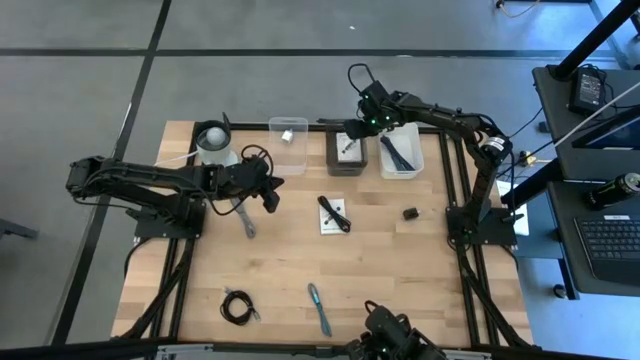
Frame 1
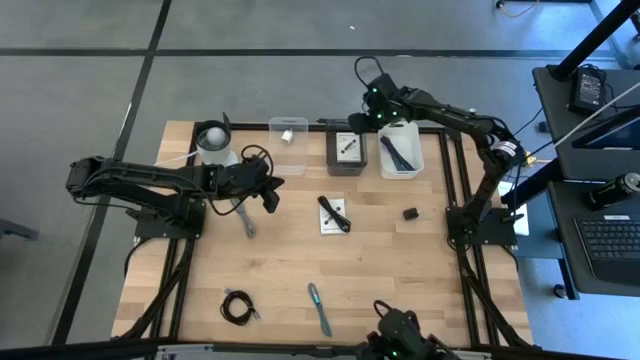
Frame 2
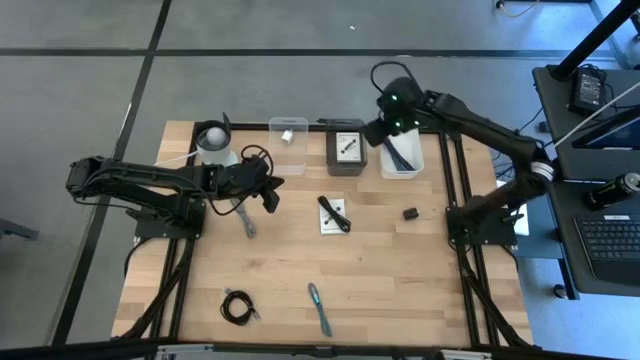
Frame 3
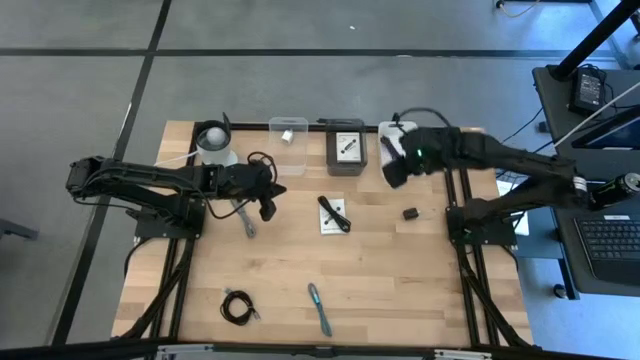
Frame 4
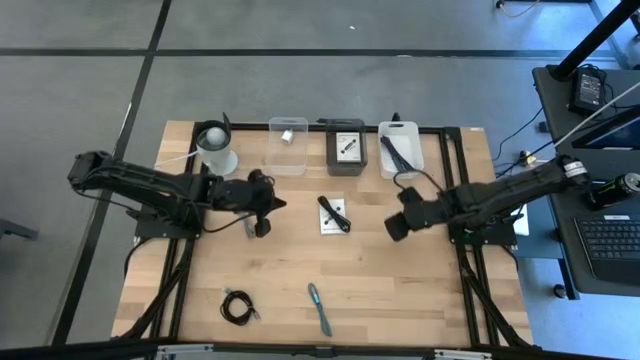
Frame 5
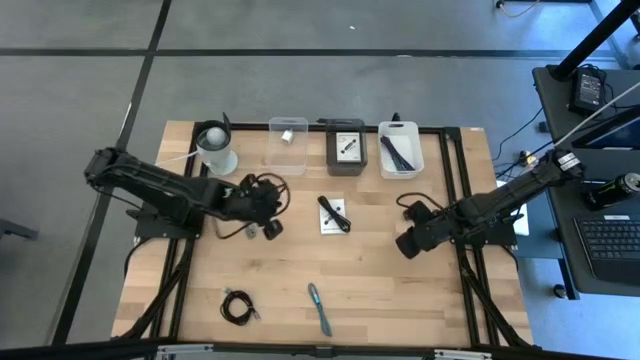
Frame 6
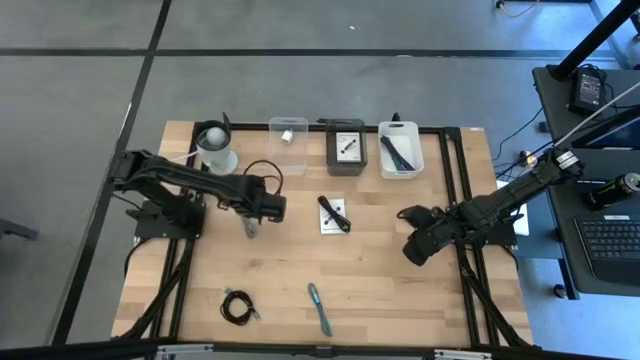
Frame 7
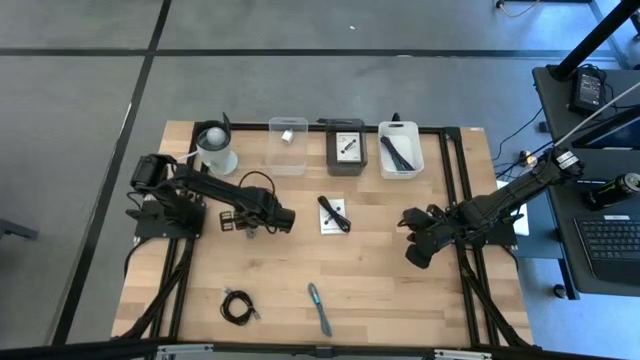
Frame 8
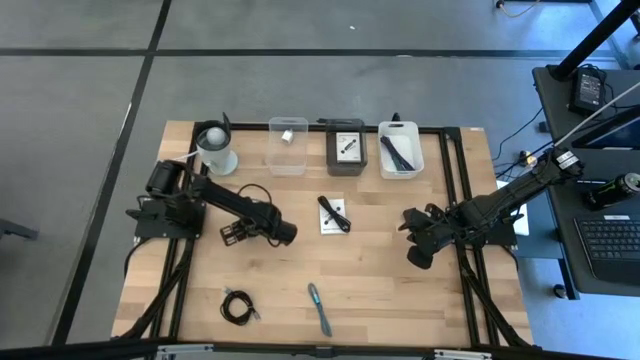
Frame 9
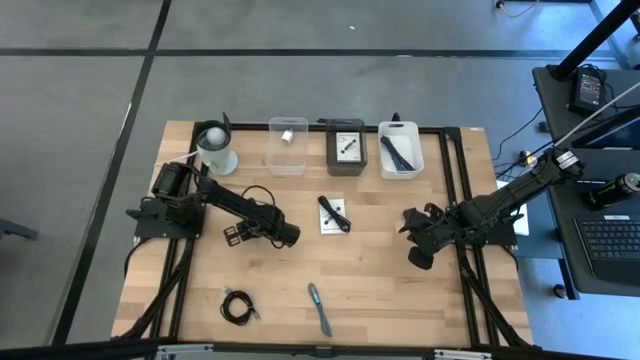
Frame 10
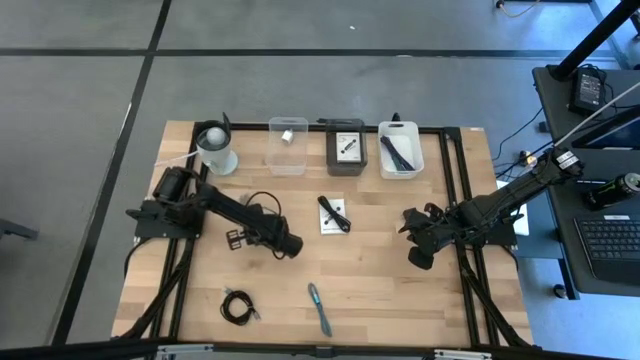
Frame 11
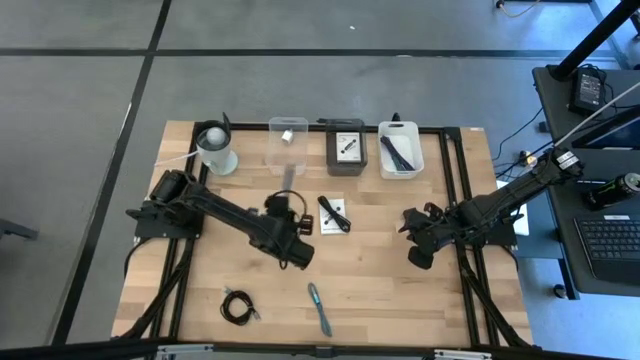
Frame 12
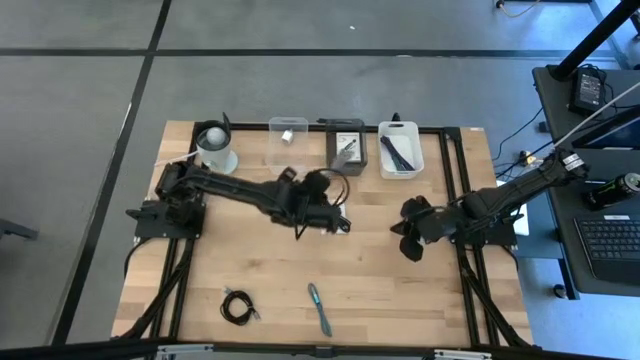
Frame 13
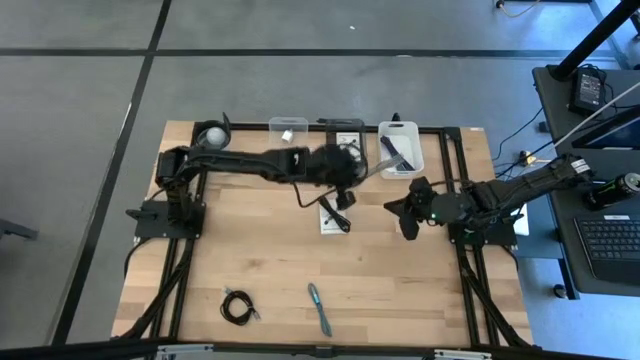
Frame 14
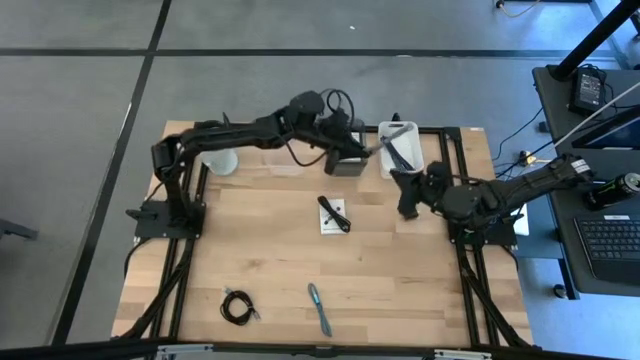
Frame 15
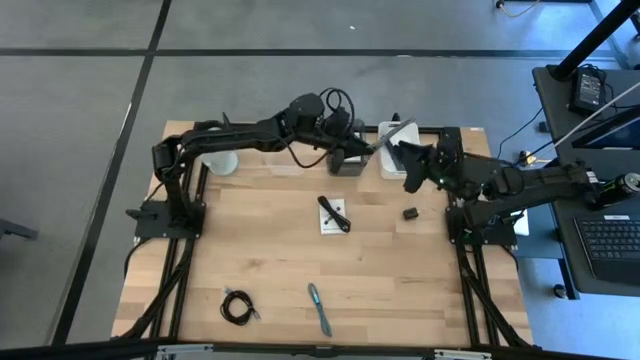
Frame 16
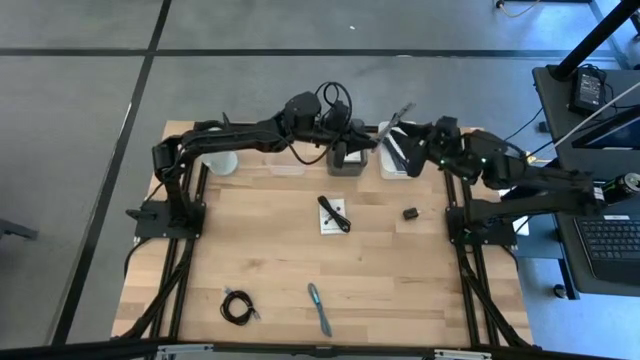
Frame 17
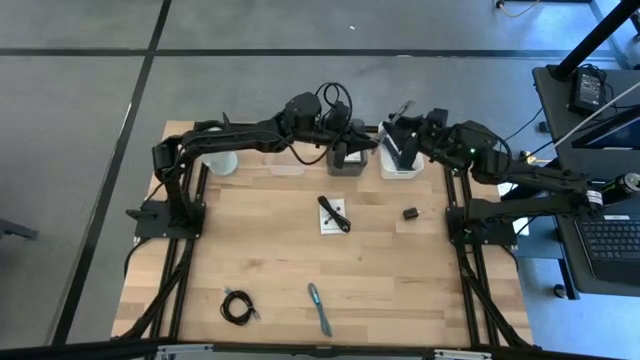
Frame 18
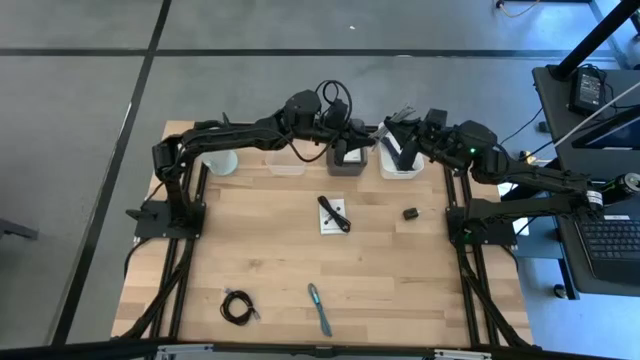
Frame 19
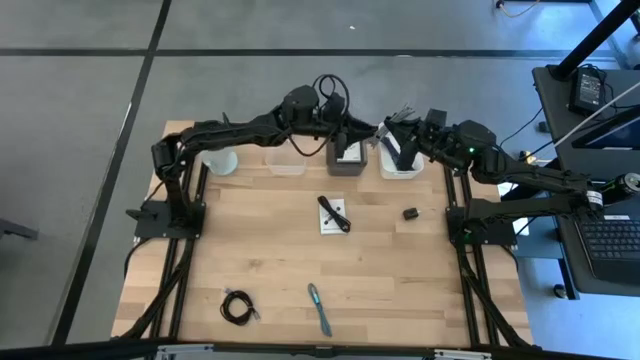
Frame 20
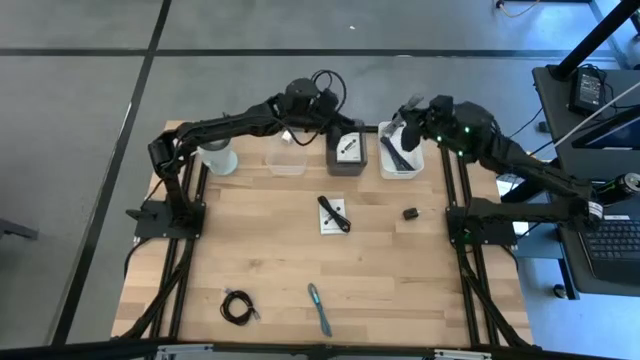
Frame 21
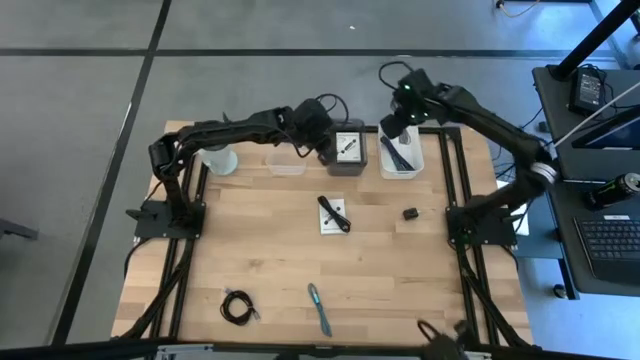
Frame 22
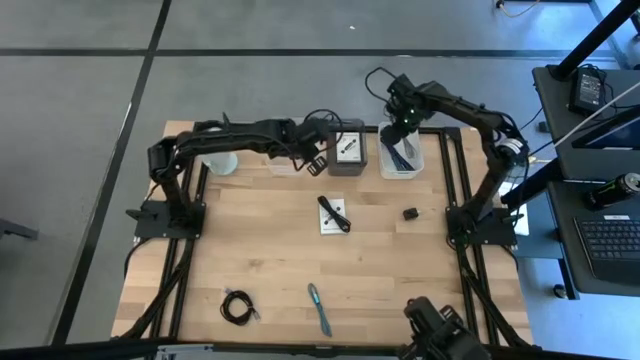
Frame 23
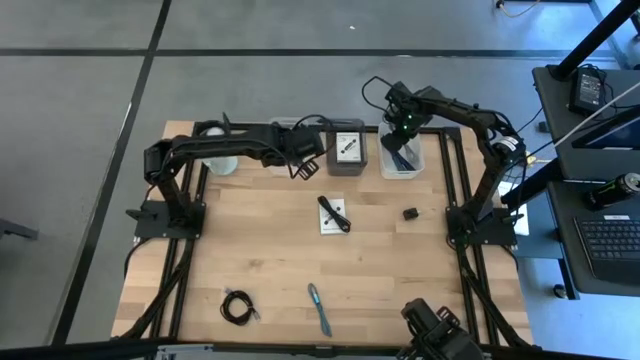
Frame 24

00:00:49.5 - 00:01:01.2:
Task: Pick and place items into bin
Put the white charger cable into the white bin

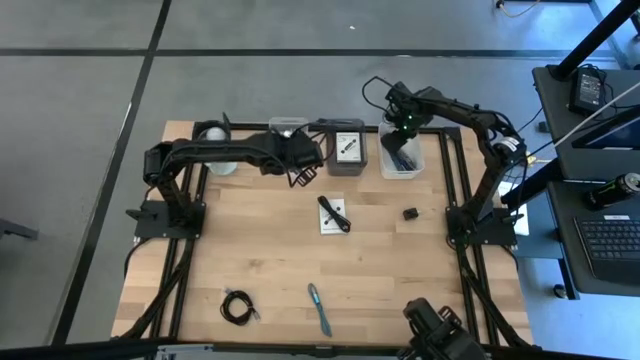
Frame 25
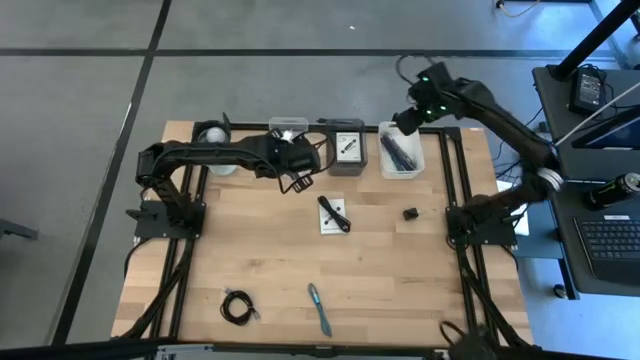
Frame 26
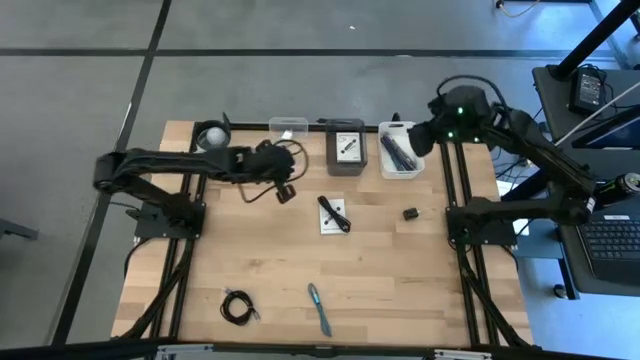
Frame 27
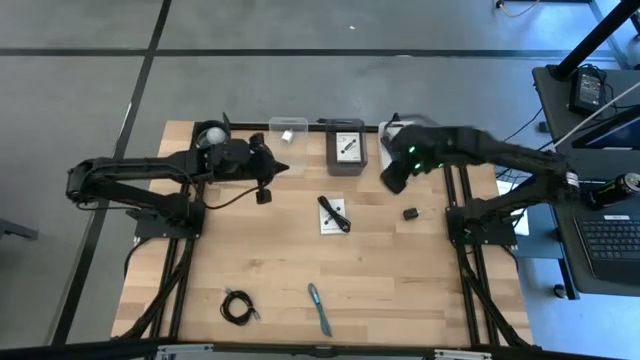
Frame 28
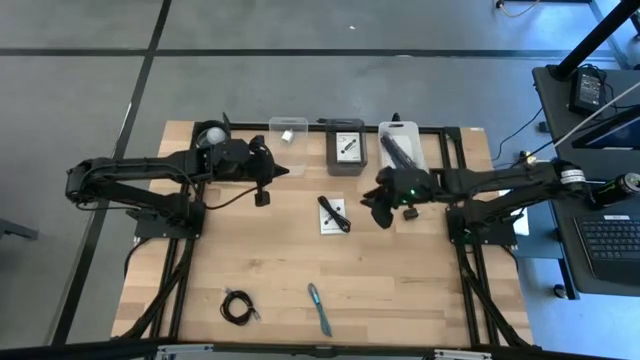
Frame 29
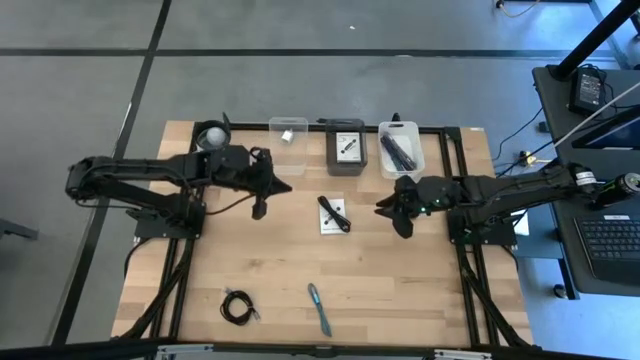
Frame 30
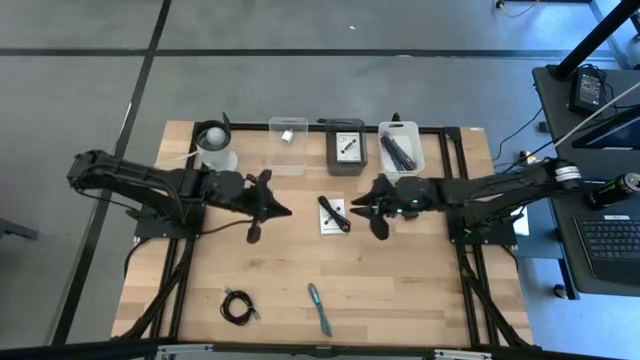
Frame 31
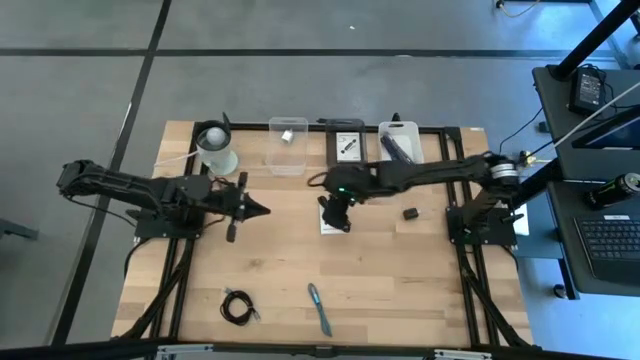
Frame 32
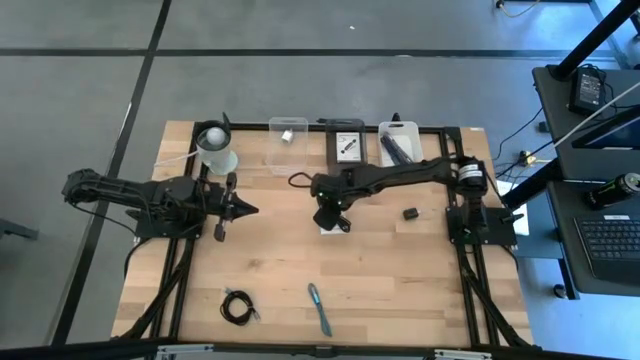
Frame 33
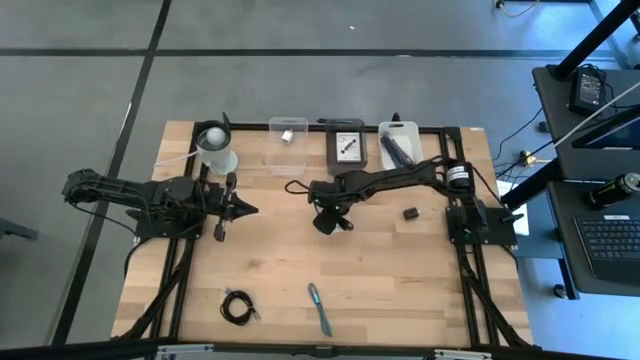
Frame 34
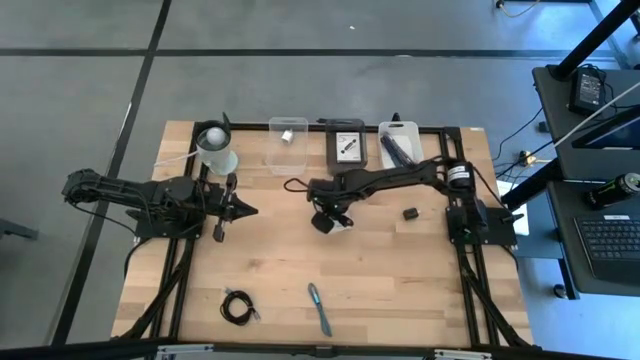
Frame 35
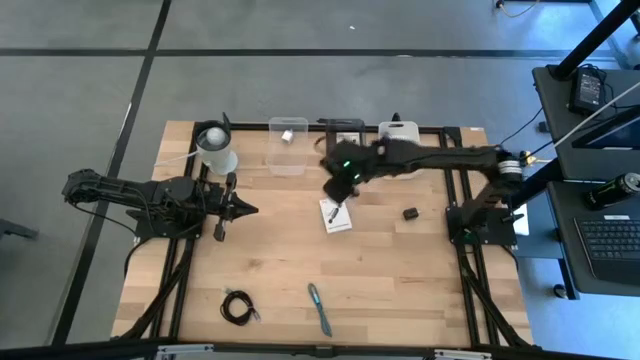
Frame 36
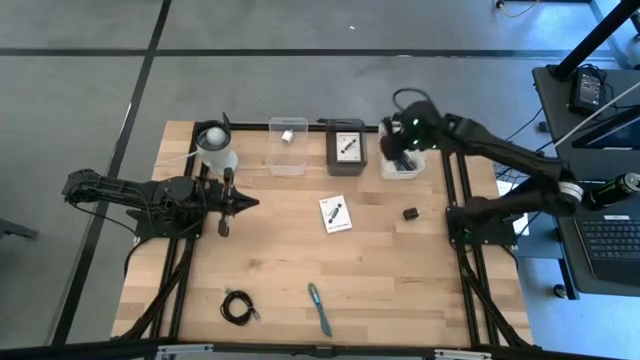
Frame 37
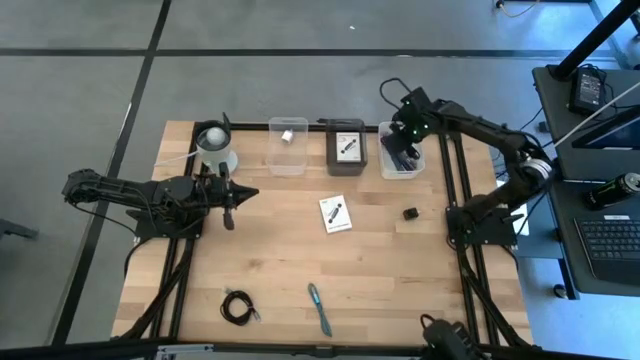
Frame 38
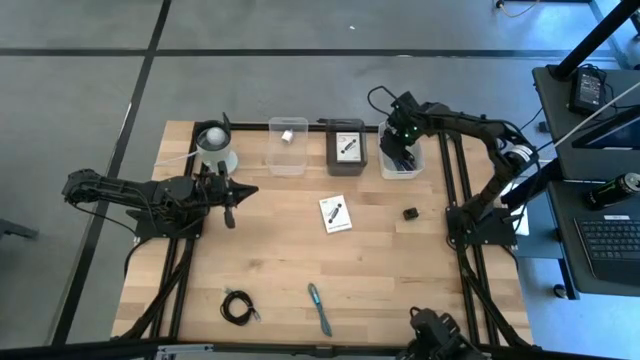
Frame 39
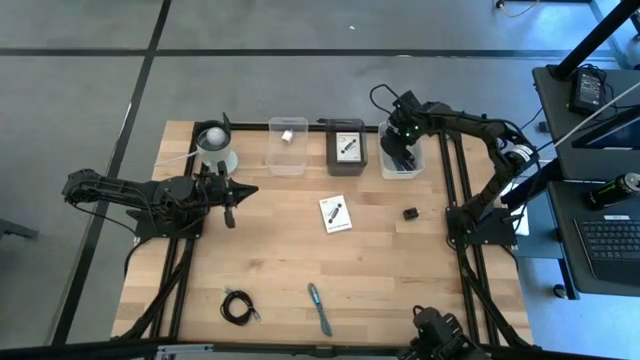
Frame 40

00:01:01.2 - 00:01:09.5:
Put the top black charger cable into the white bin

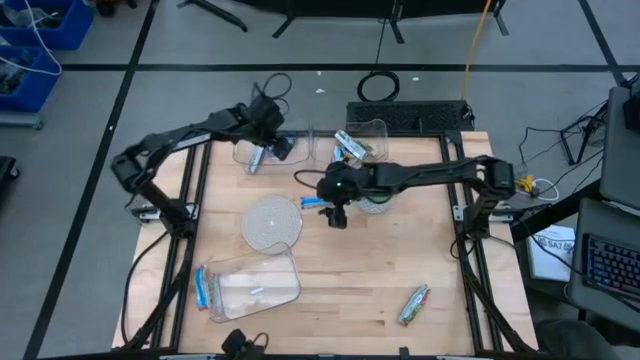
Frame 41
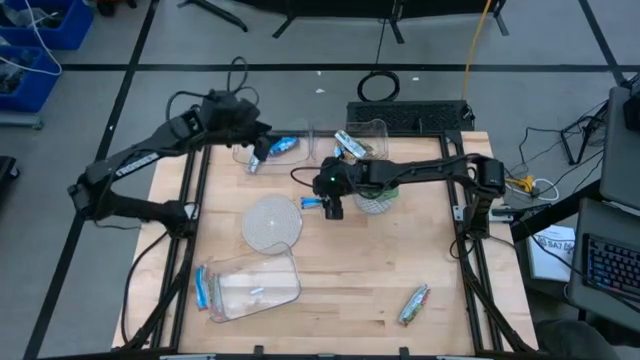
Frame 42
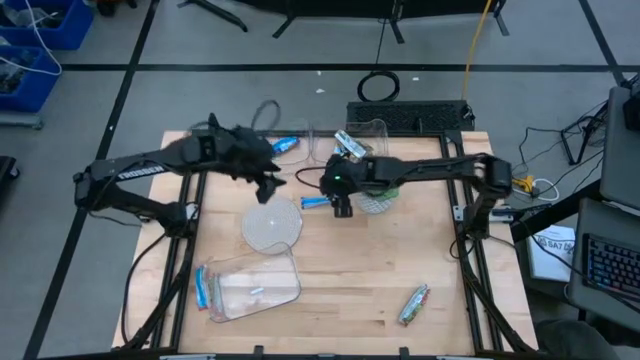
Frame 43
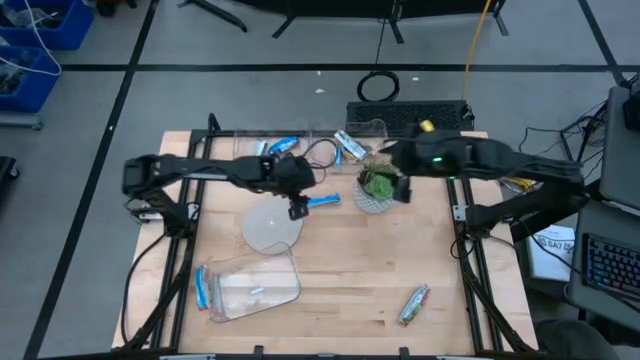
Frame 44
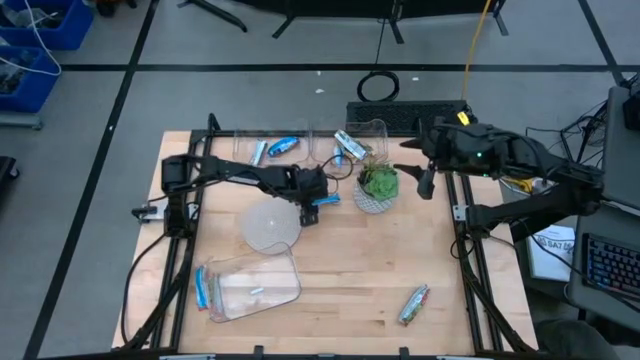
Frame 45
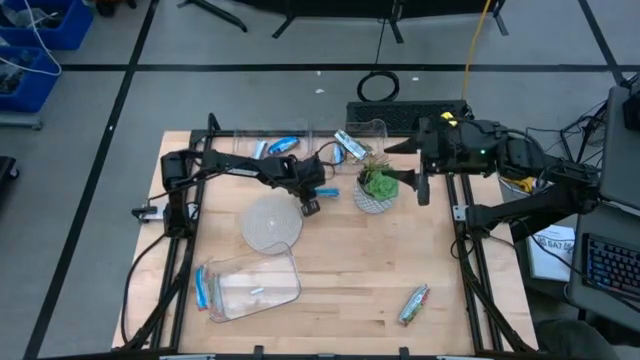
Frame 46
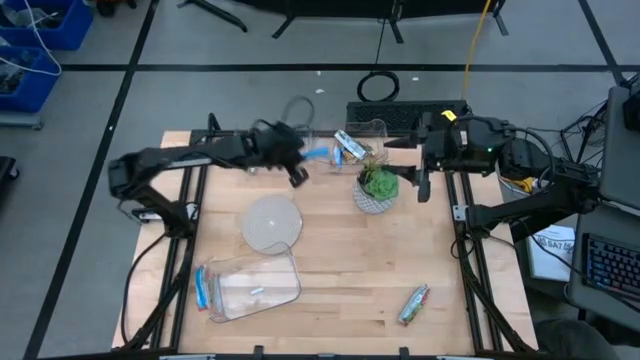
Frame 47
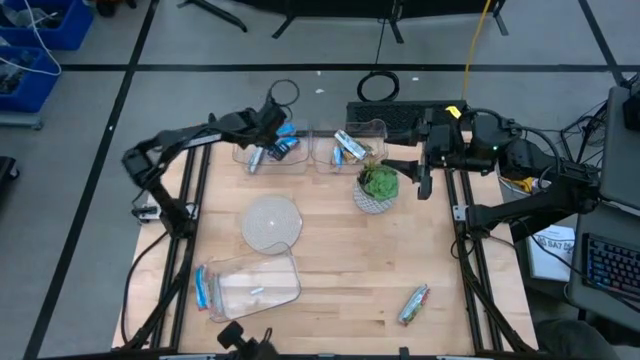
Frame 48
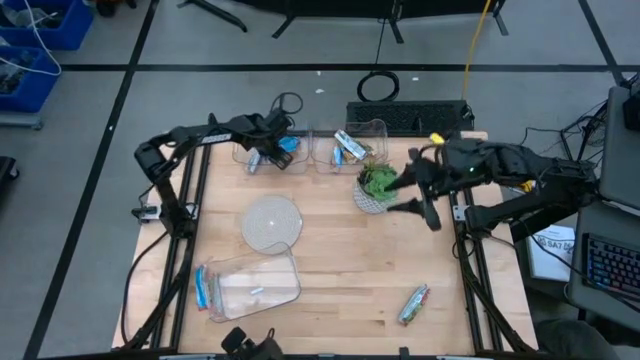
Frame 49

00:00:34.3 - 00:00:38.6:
Task: Pick and place Granola Bars by type
Put the blue granola bar into the top left transparent bin
